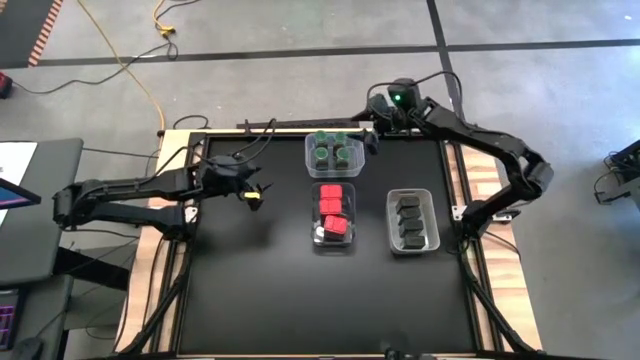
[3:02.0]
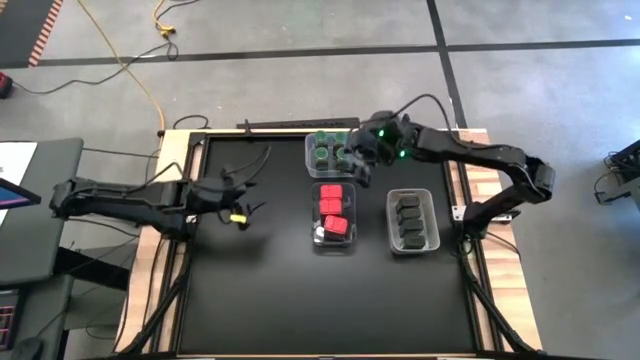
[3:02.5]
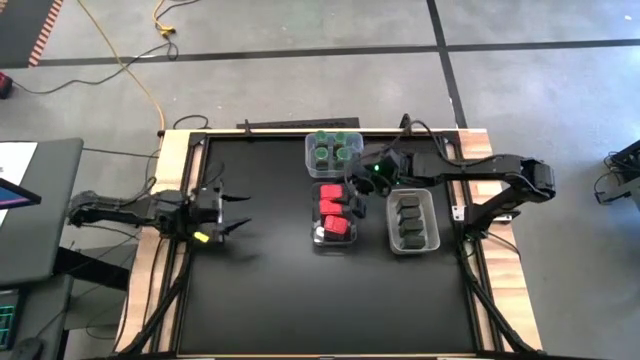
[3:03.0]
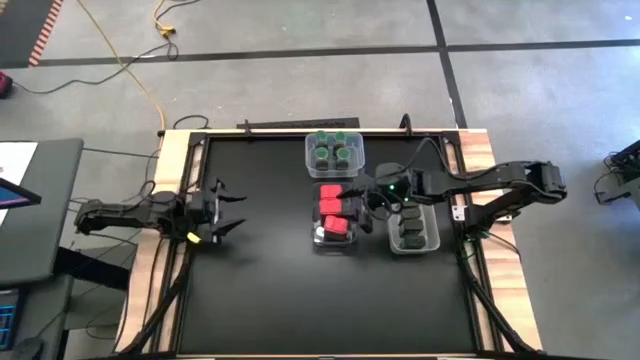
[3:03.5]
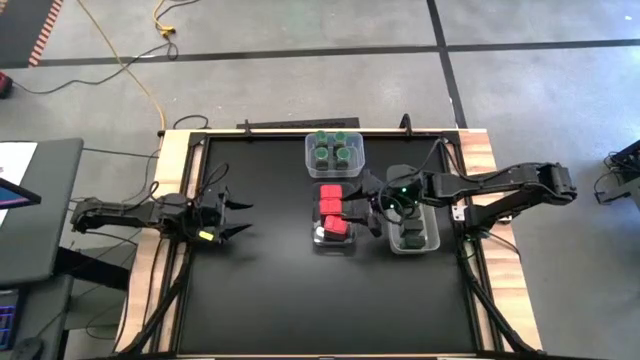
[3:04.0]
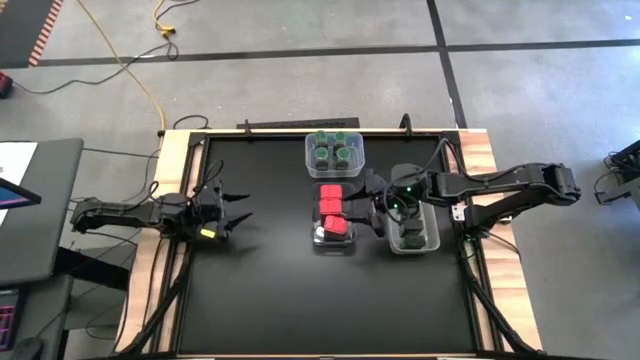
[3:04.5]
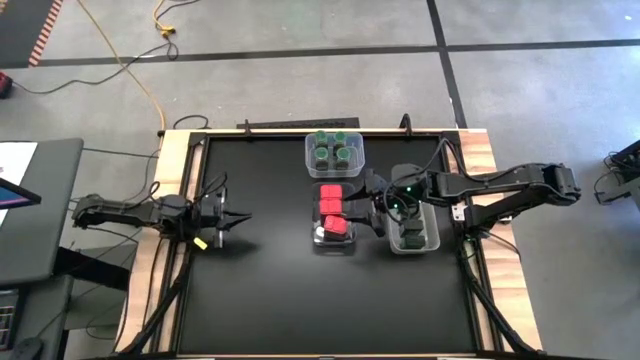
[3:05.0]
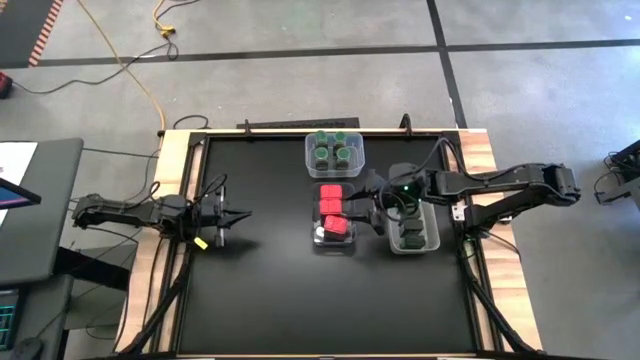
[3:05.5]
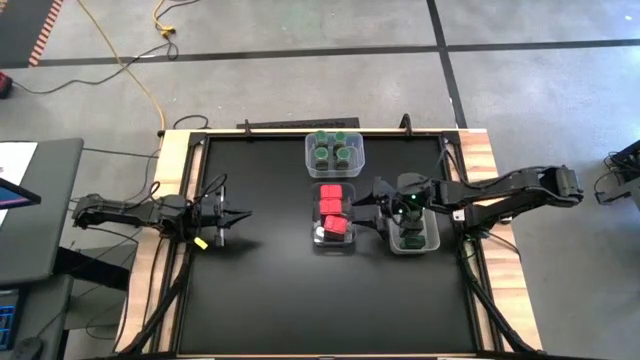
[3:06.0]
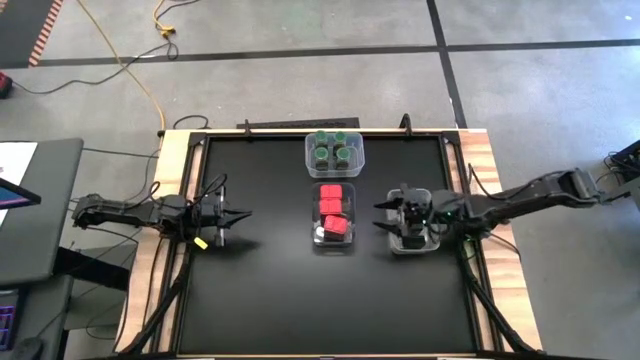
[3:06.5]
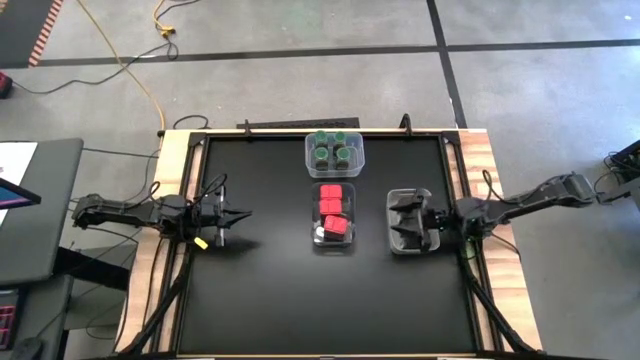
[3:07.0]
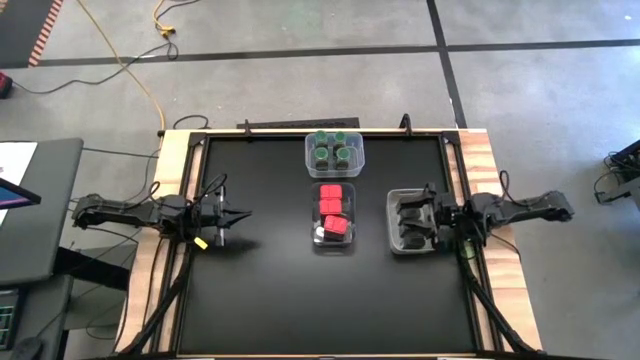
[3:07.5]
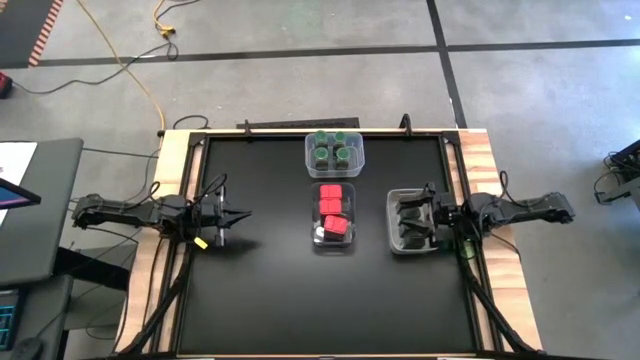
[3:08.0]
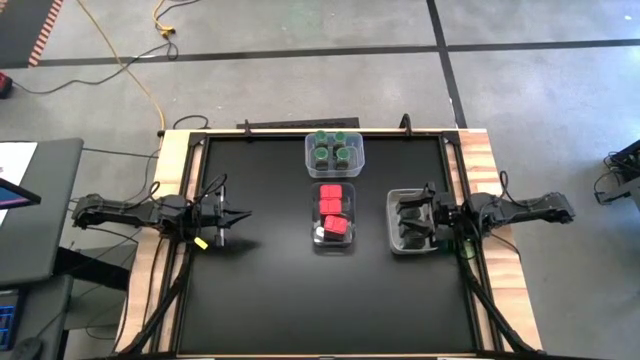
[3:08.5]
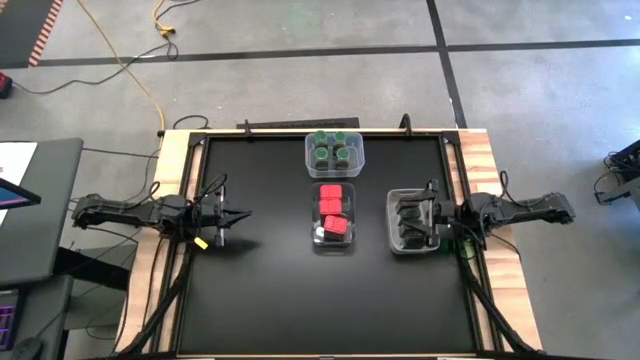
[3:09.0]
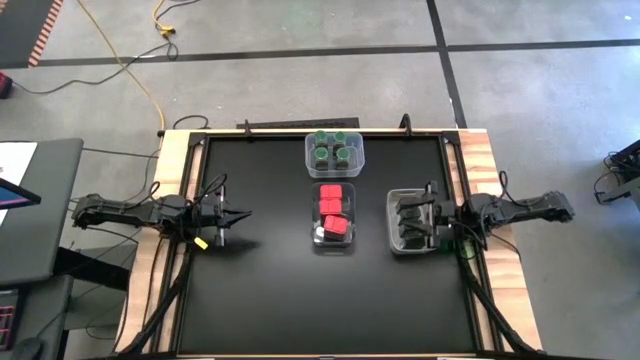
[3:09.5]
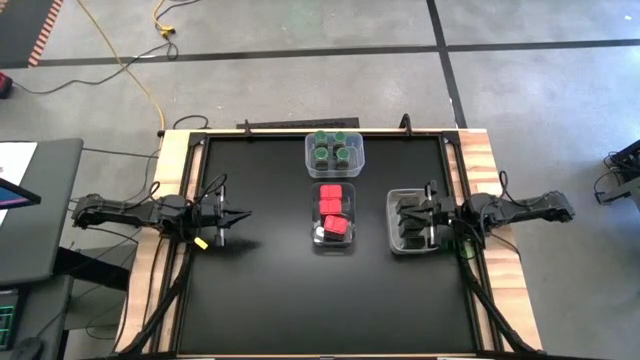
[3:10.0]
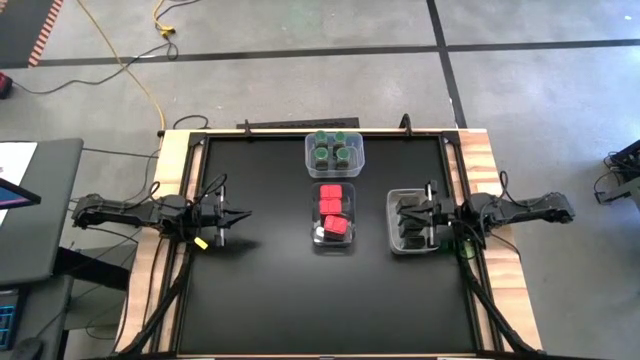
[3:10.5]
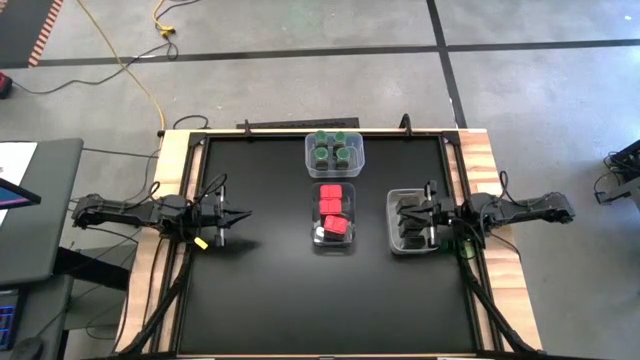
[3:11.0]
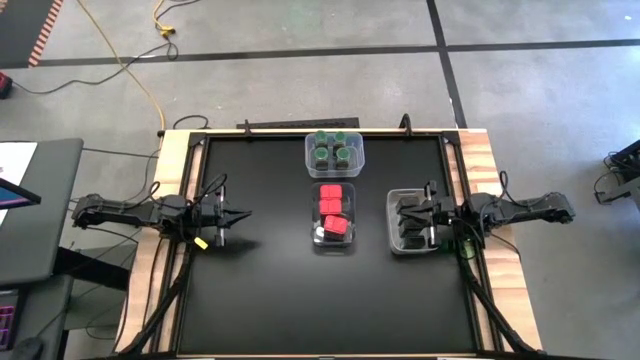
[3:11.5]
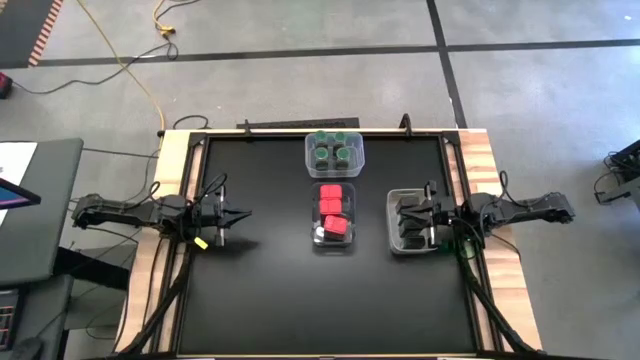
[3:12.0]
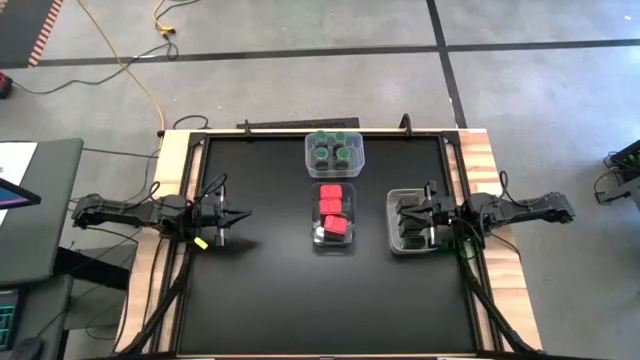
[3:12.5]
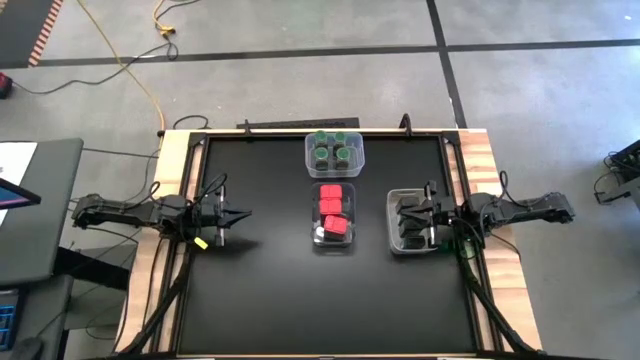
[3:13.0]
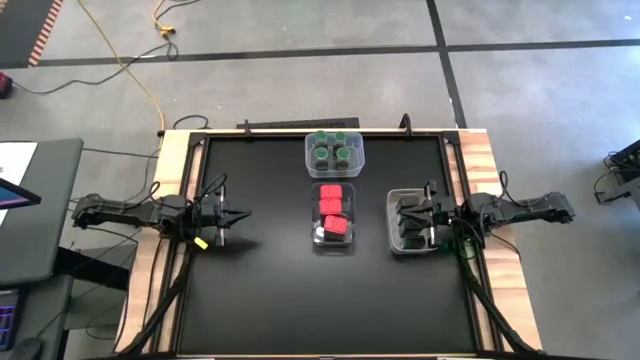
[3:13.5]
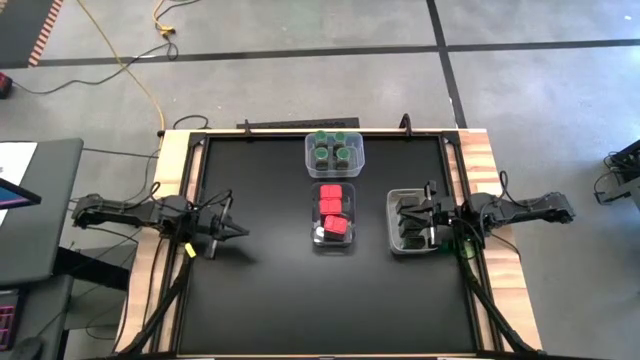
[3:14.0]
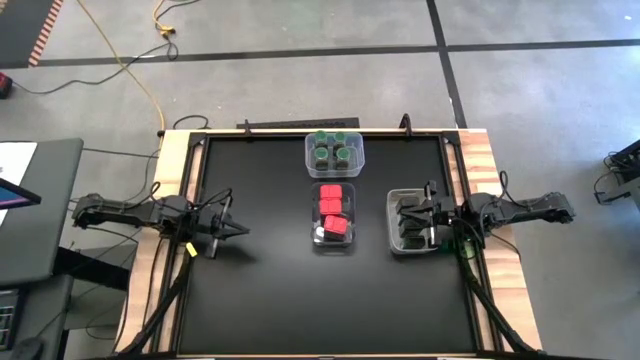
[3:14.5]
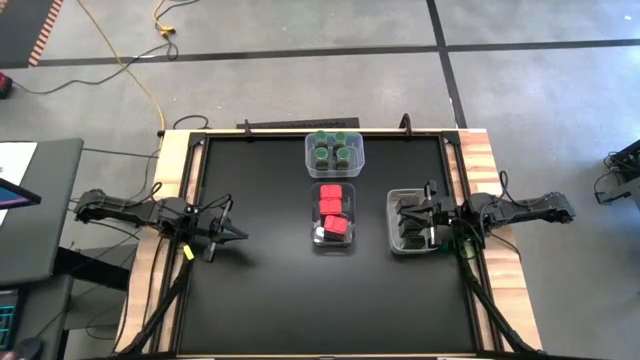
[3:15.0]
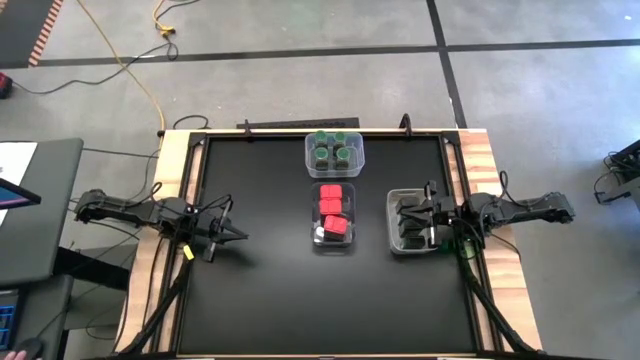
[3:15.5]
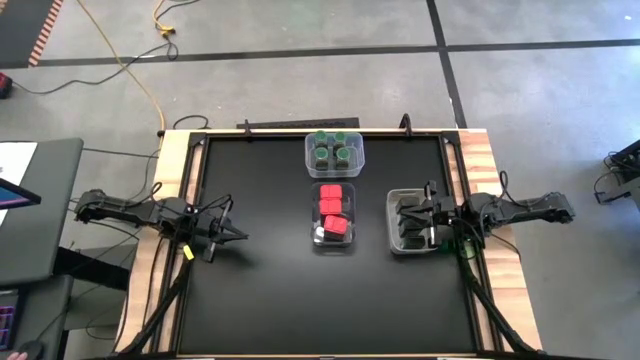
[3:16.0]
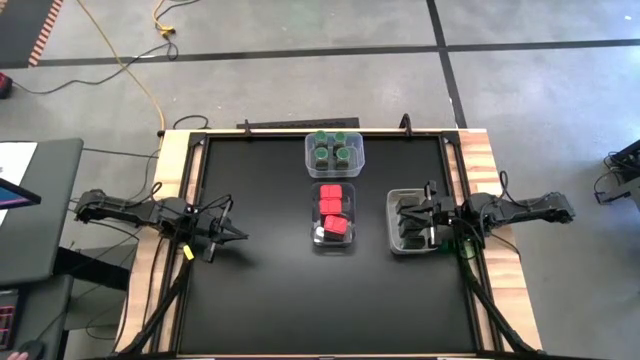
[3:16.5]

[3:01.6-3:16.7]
Task: Sort spices by type
Return to Home Position

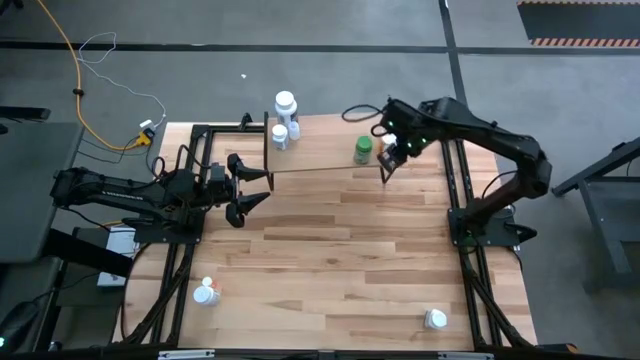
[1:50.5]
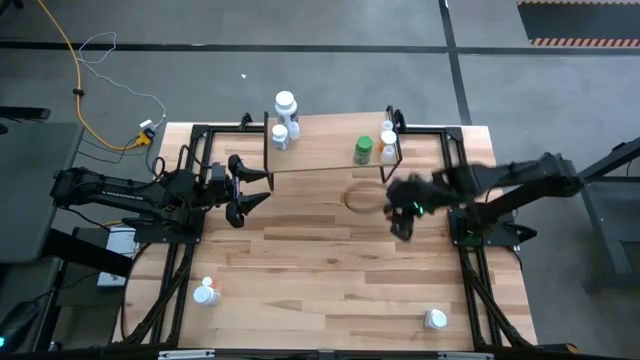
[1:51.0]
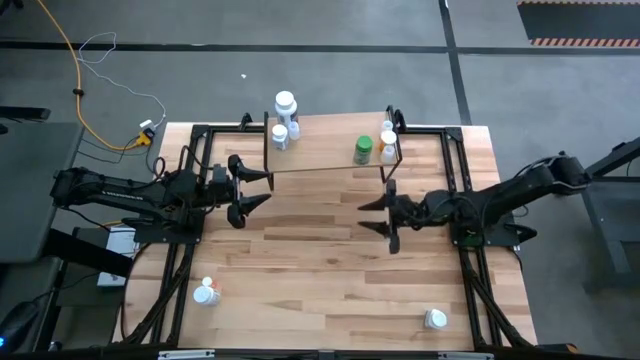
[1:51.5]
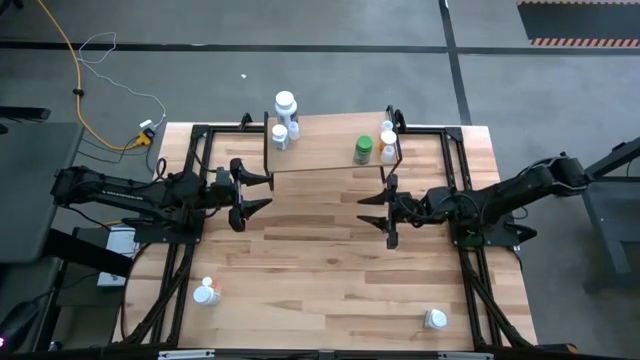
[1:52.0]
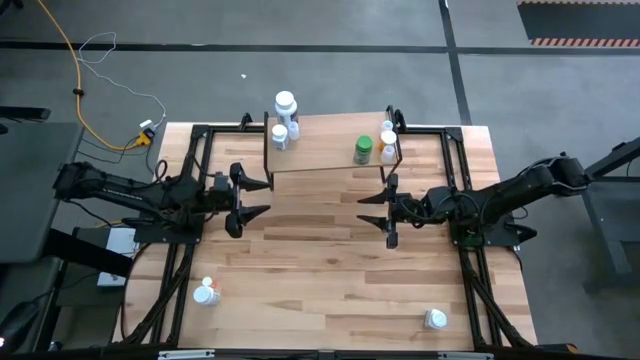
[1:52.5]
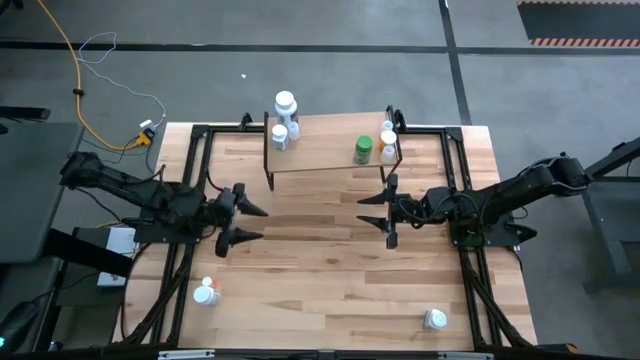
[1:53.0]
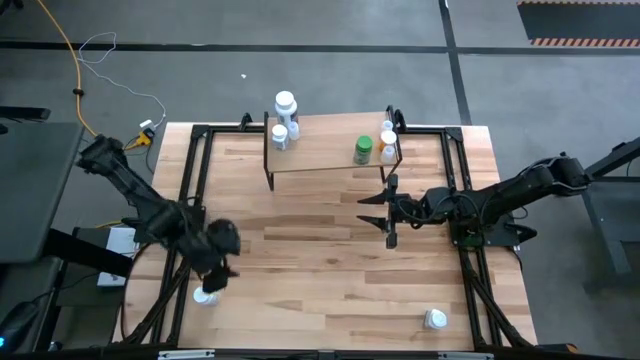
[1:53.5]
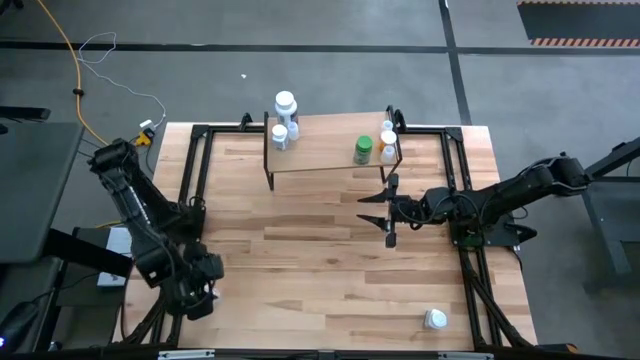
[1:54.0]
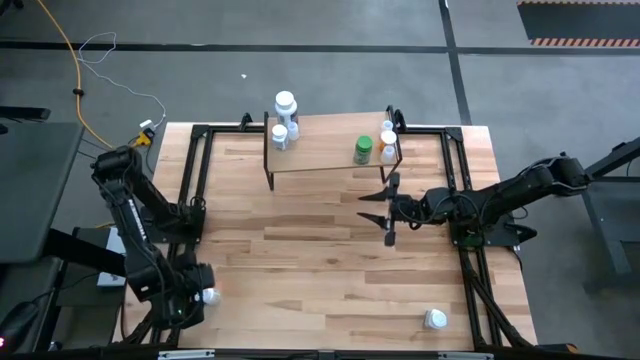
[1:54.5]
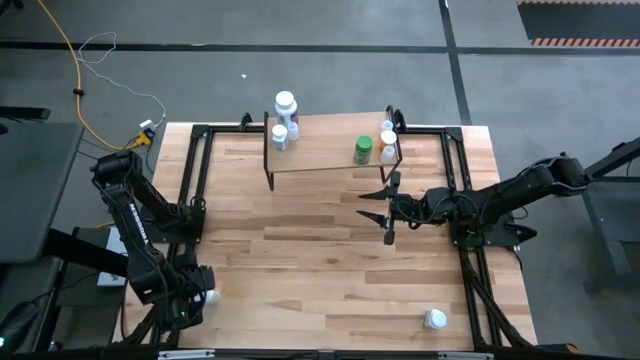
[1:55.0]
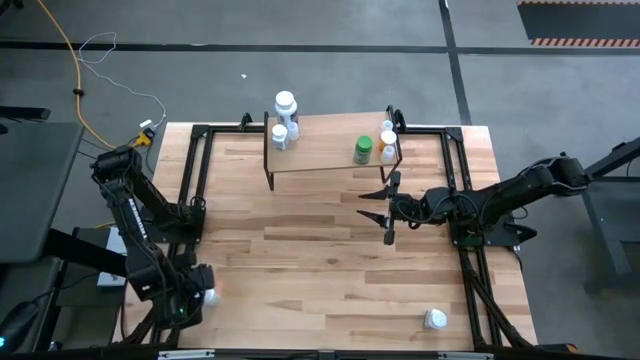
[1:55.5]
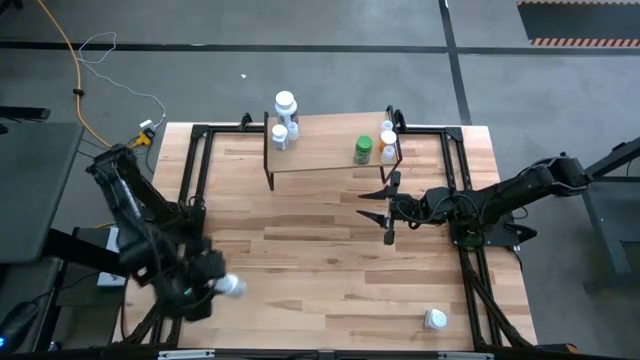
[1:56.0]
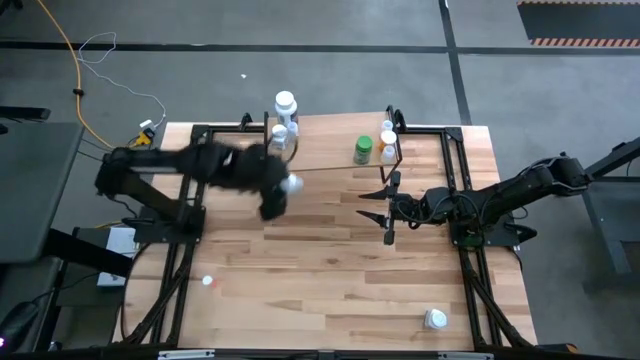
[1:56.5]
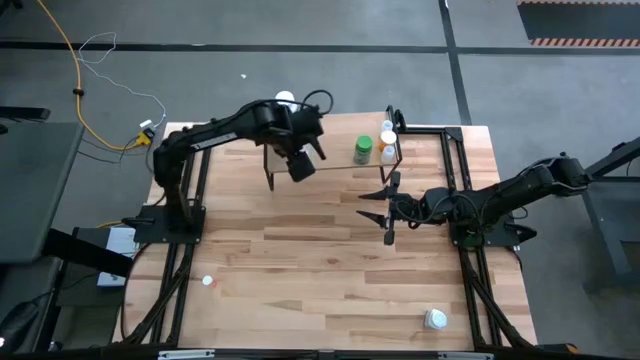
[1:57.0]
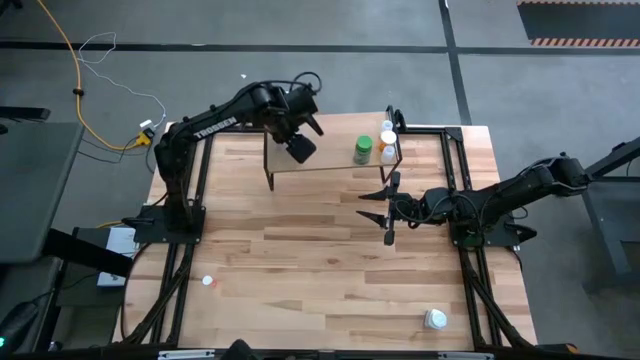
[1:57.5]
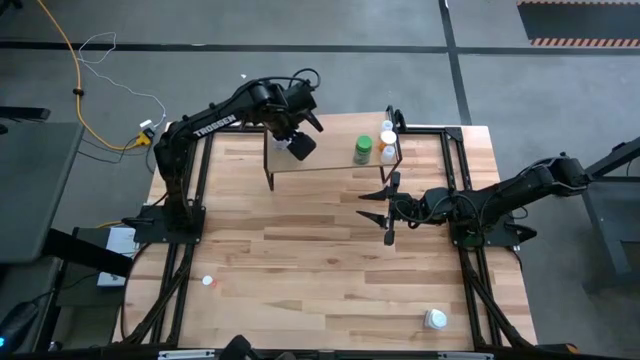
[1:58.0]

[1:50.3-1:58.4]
Task: Pick and place medicine bottles onto shelf by color
Put the white yellow pill bottle on the shelf
